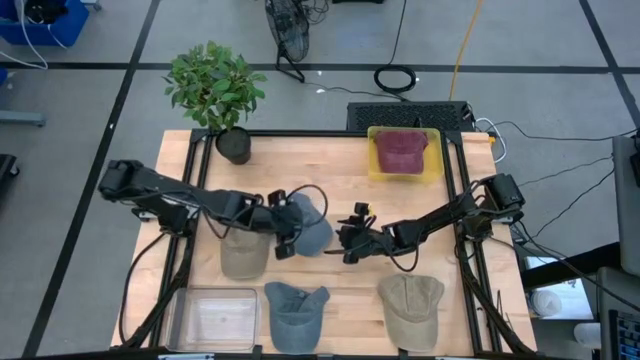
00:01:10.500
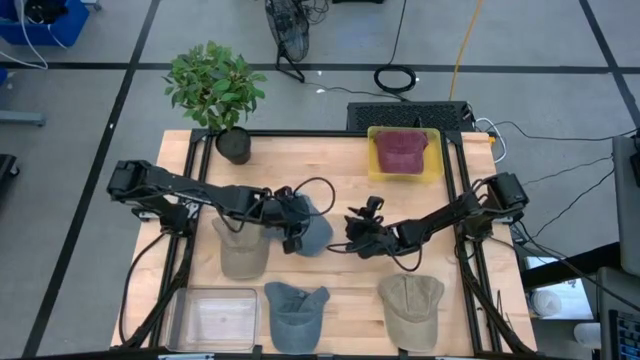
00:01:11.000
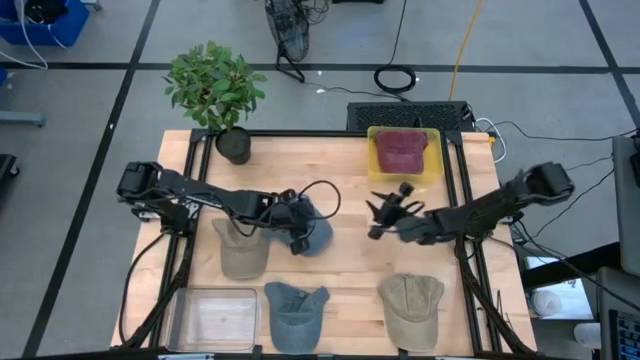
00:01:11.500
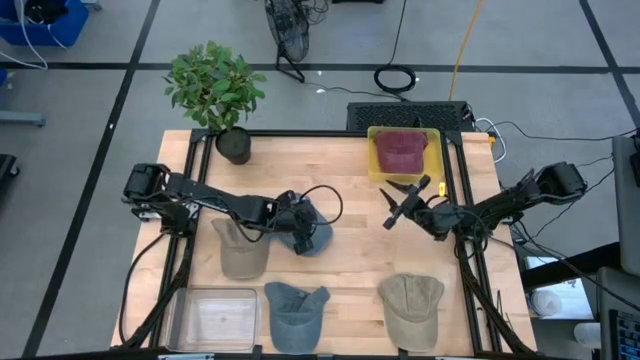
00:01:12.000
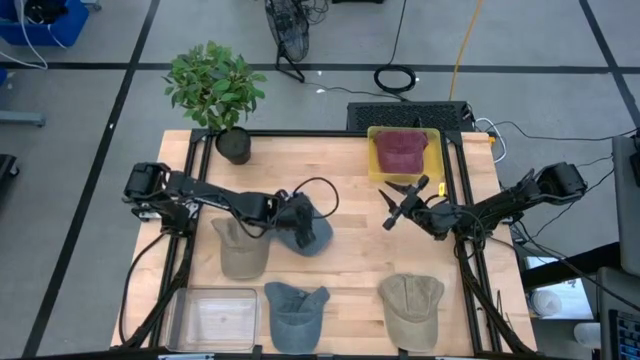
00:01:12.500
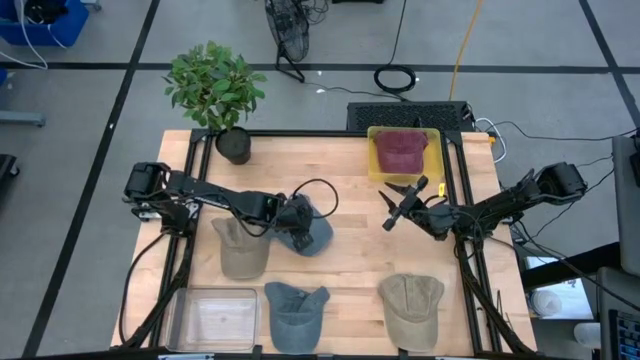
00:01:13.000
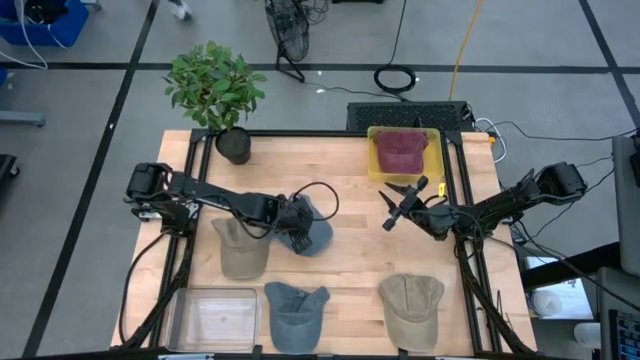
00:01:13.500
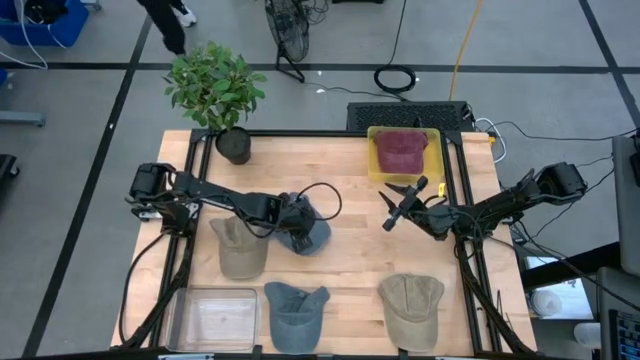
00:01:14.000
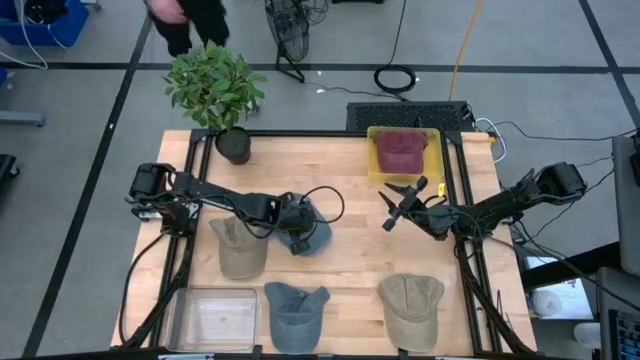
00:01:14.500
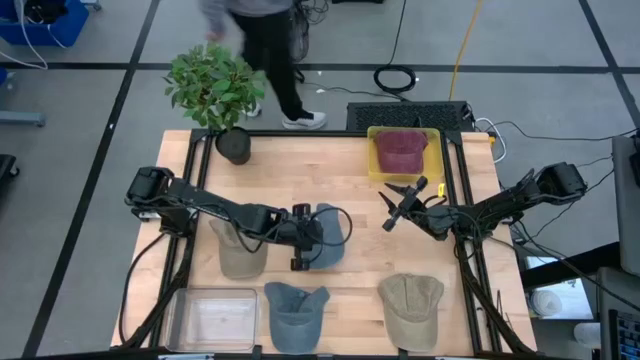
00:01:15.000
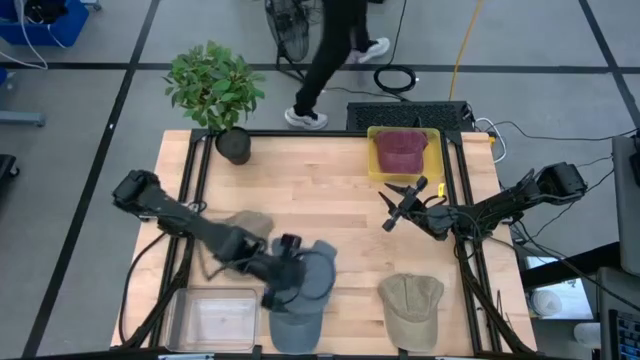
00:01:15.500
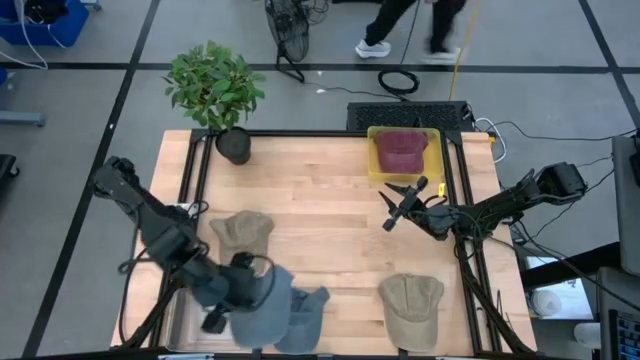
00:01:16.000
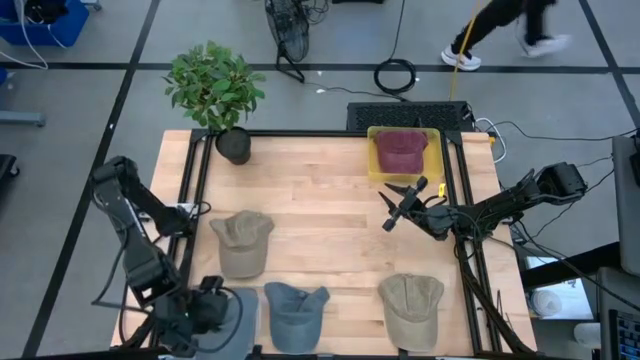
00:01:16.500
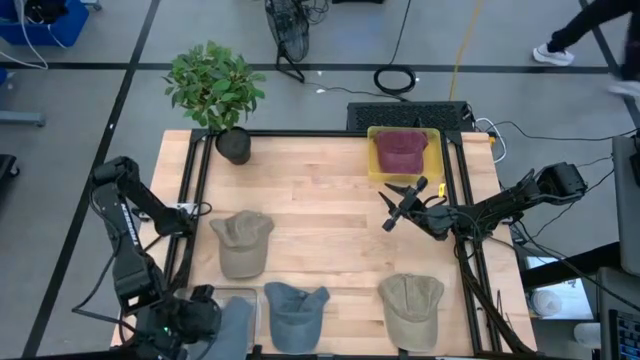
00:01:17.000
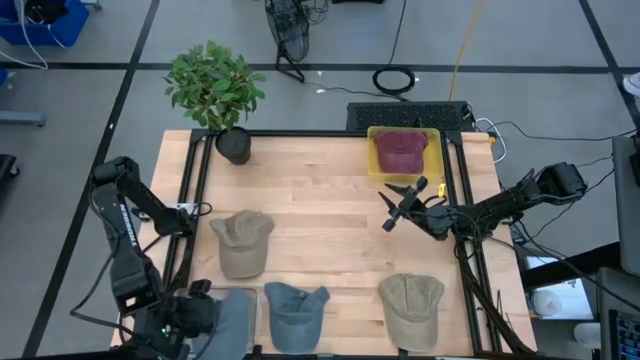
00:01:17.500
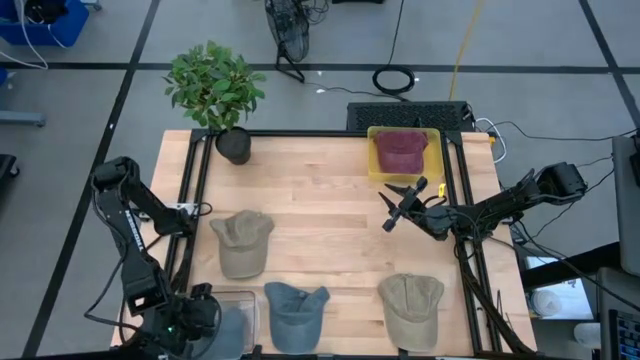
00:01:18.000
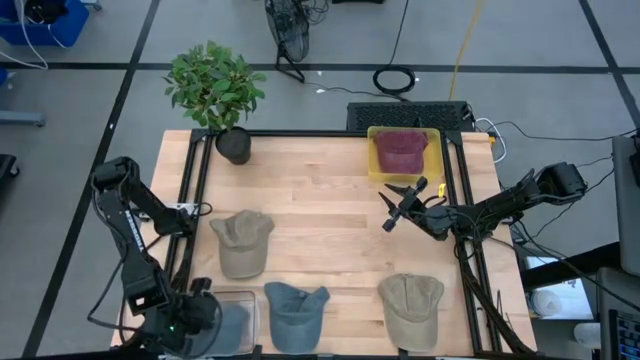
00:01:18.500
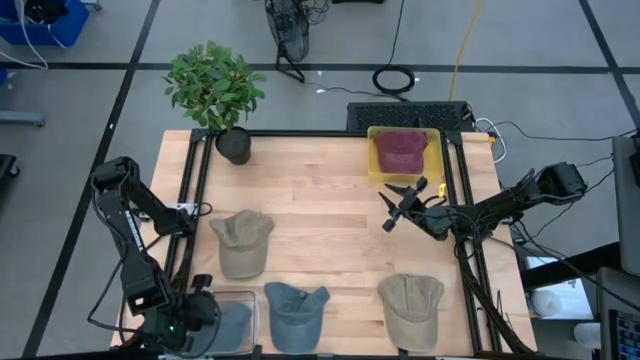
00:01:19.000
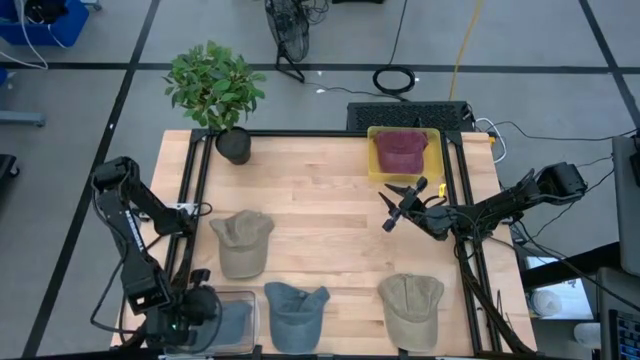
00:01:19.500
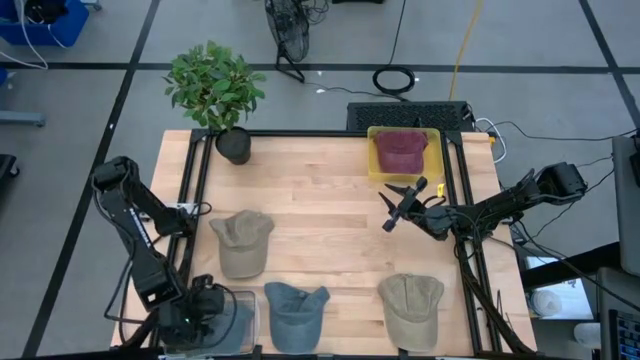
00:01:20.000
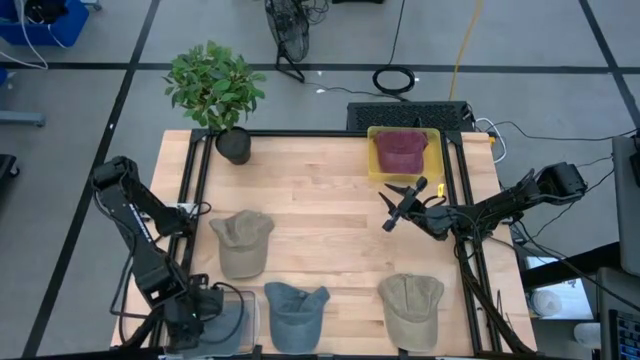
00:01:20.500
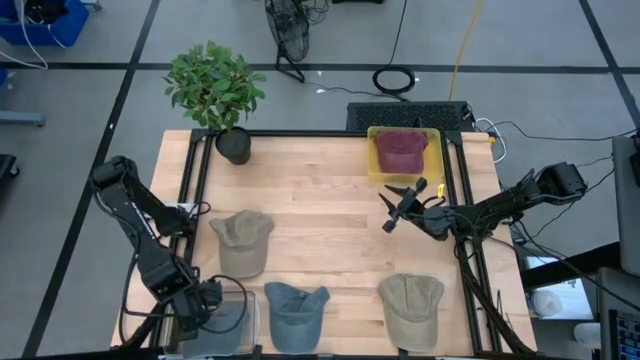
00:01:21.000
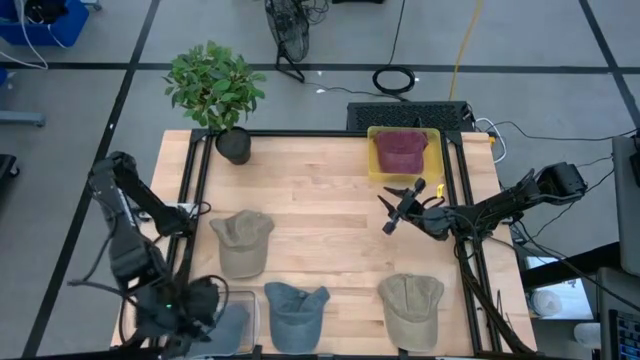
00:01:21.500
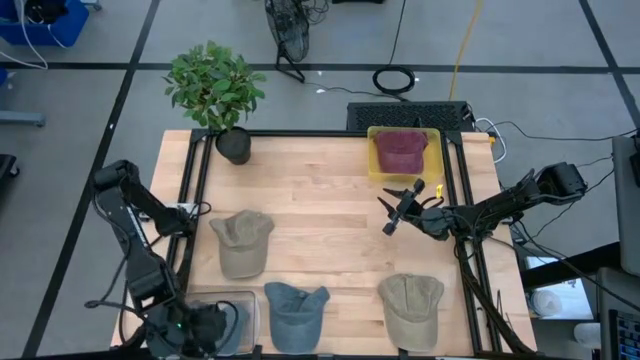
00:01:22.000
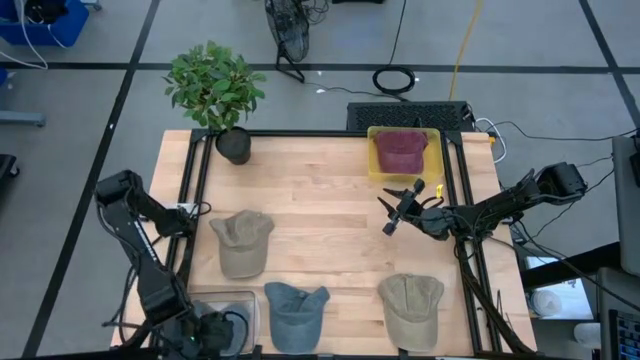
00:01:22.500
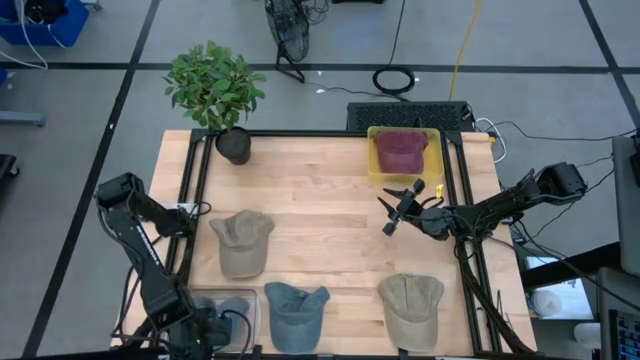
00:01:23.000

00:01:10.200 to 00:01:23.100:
Task: Pick & Place hat
Put the gray cap into the transparent bin

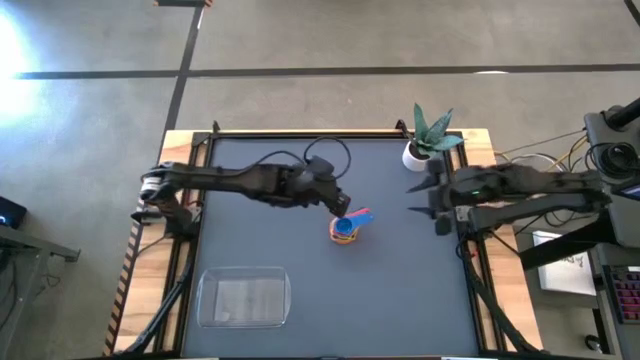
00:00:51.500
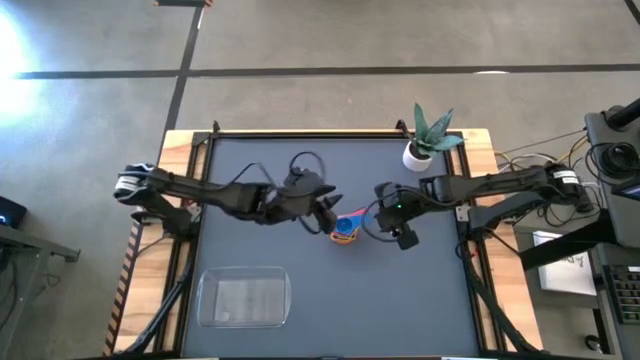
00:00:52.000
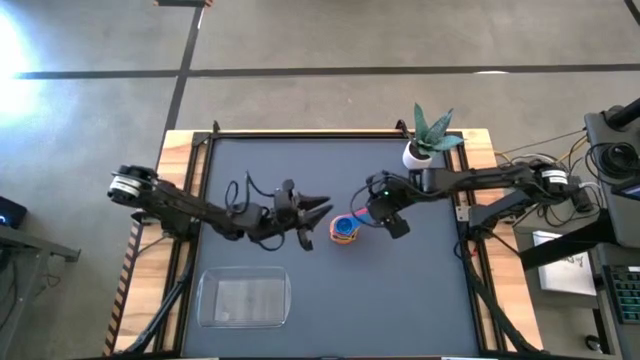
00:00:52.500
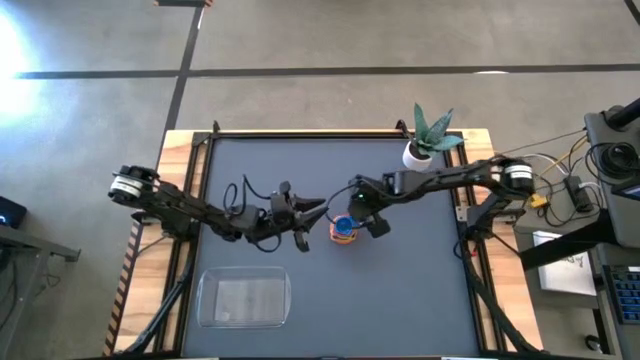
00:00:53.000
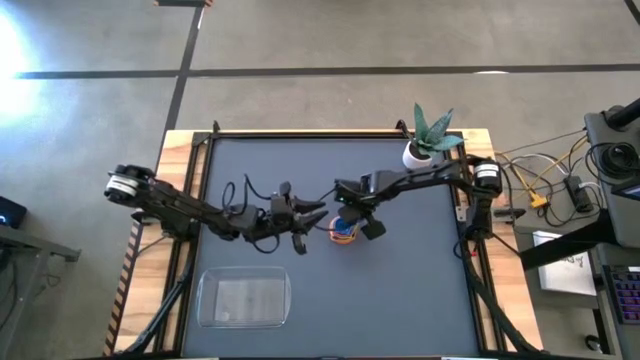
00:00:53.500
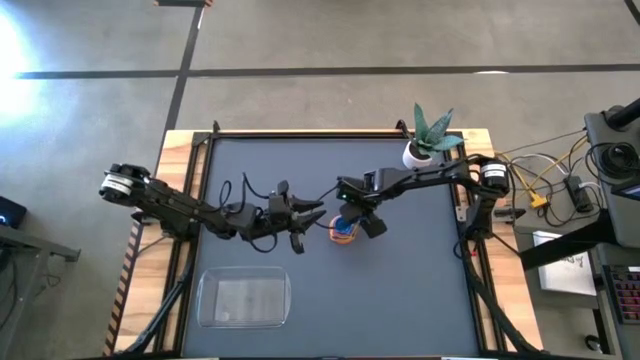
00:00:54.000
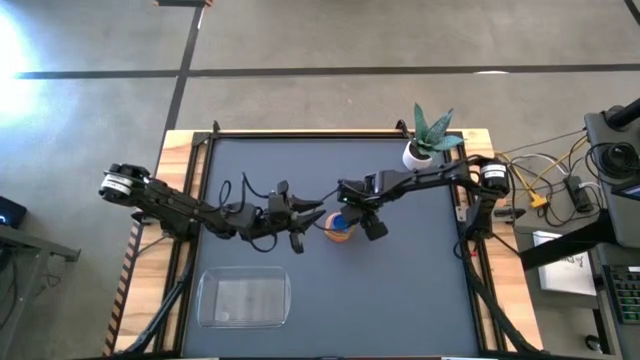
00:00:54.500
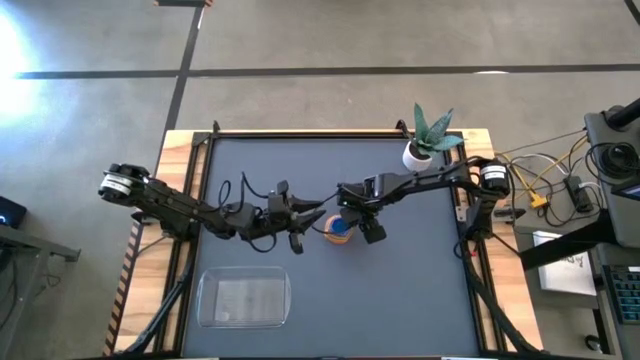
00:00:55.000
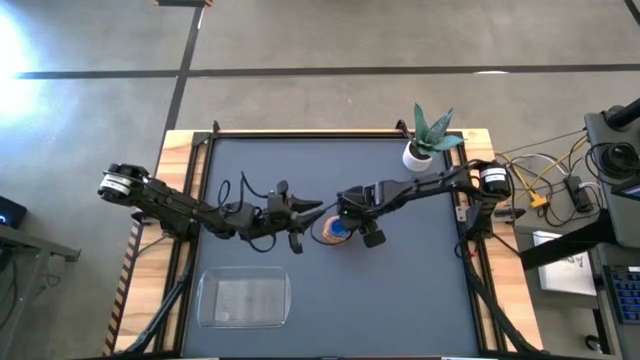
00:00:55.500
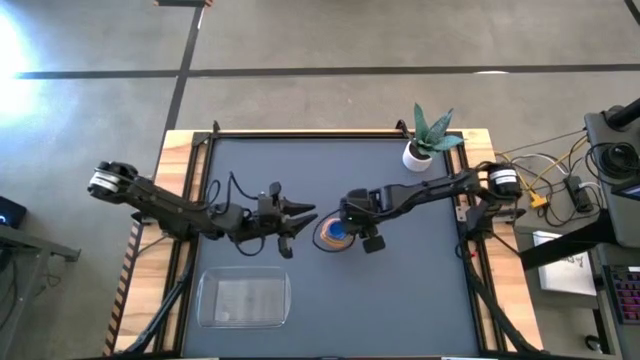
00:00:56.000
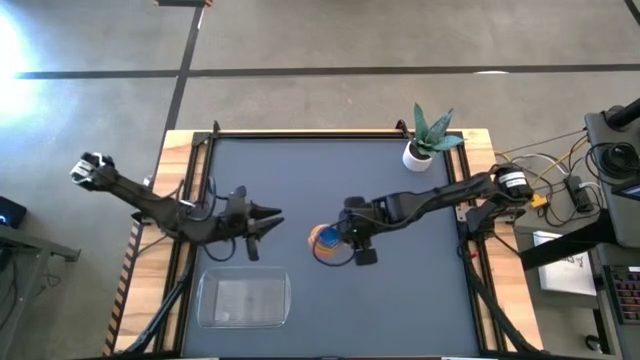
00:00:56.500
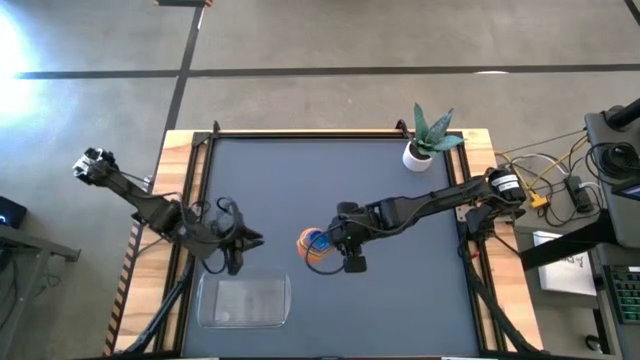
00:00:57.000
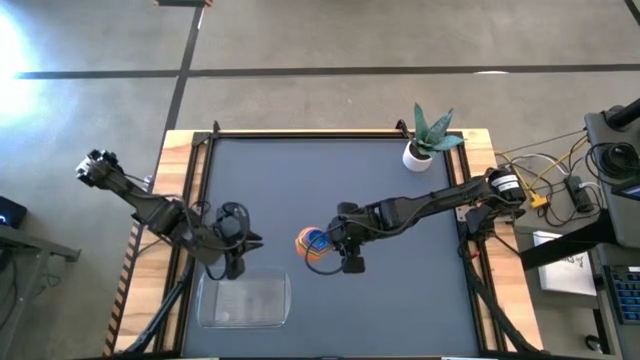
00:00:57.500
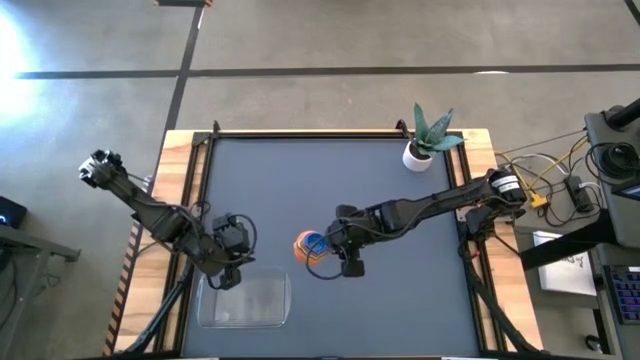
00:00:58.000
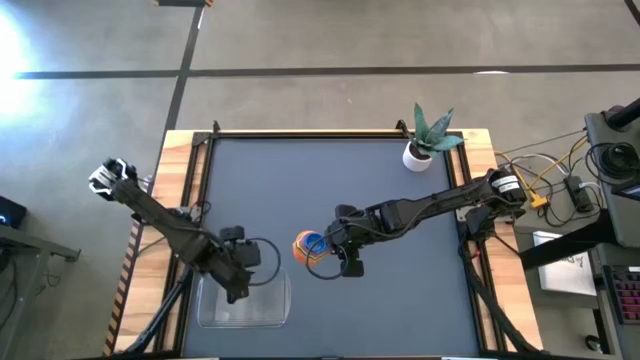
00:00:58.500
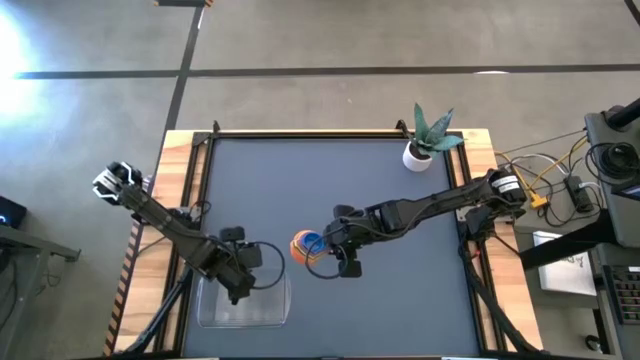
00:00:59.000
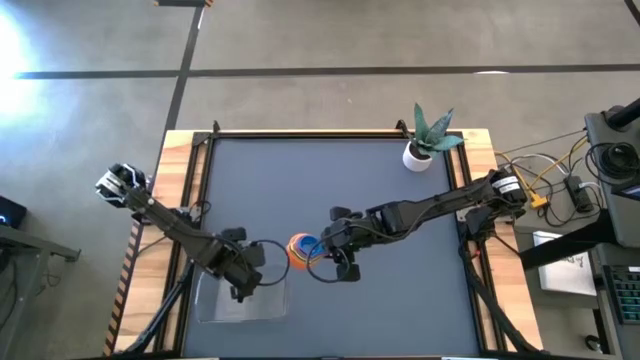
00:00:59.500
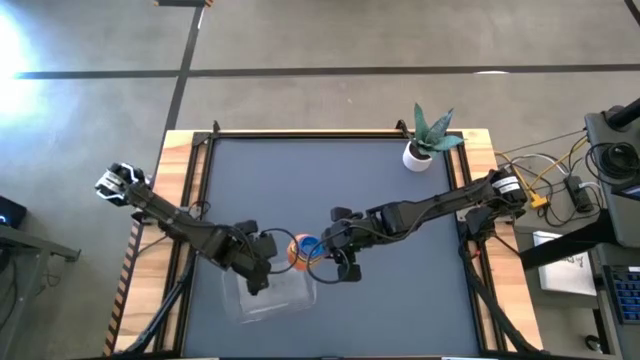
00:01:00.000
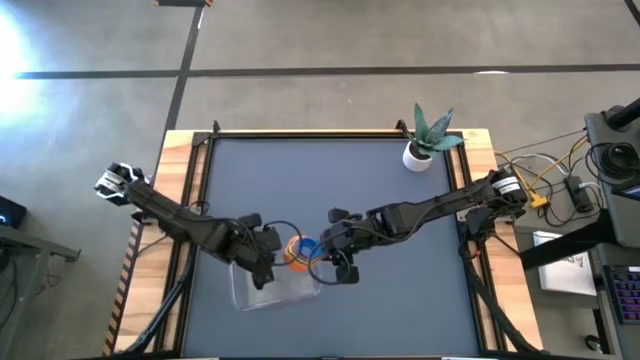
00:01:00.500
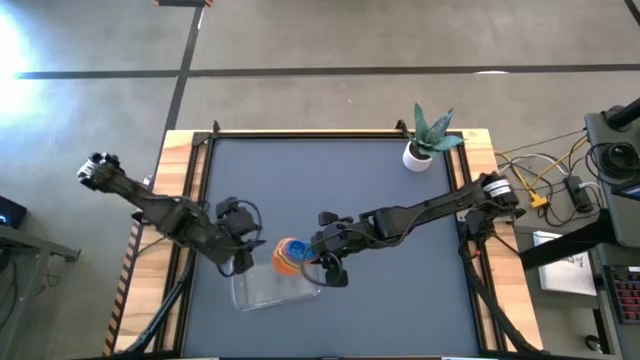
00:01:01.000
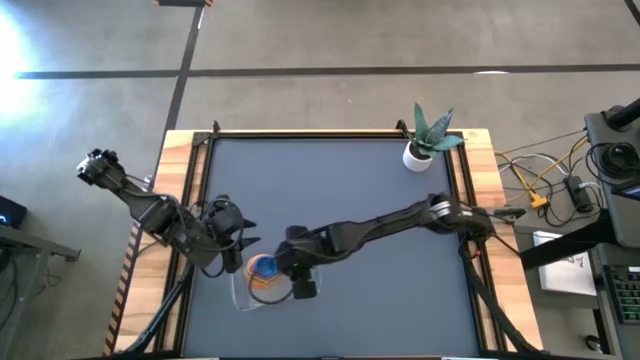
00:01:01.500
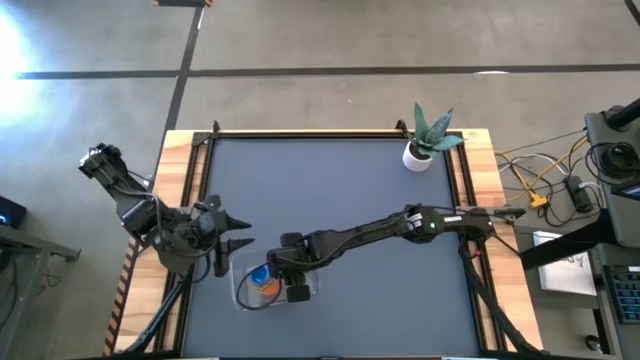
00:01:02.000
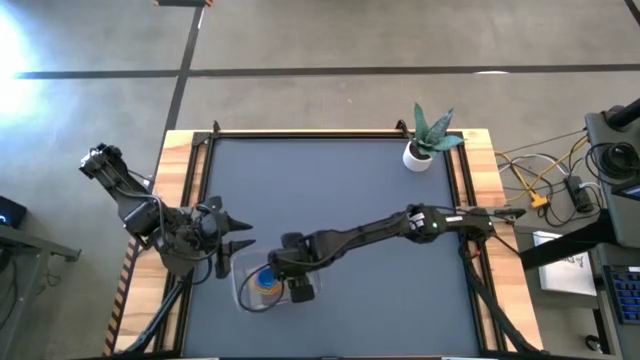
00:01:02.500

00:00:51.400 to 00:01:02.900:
Task: Nest measuring cups in basket
Put the nested measuring cups into the transparent bin
